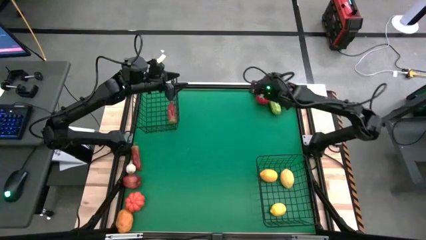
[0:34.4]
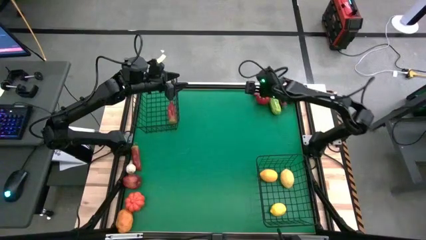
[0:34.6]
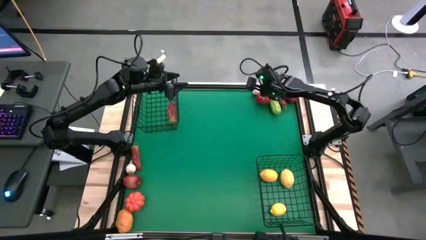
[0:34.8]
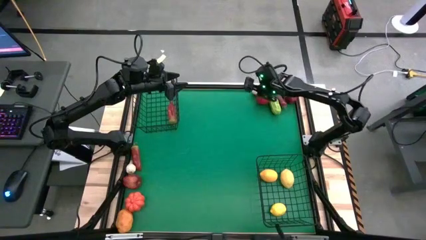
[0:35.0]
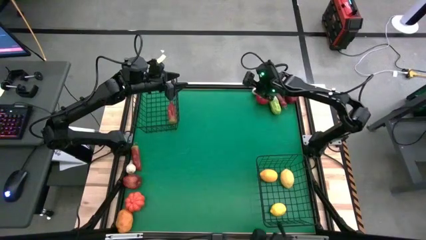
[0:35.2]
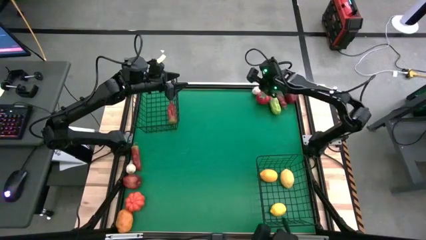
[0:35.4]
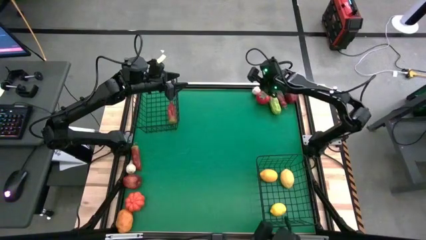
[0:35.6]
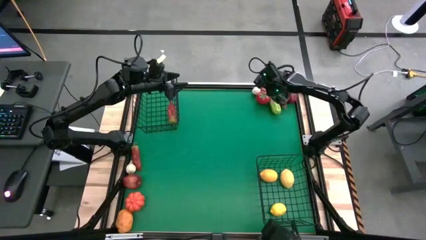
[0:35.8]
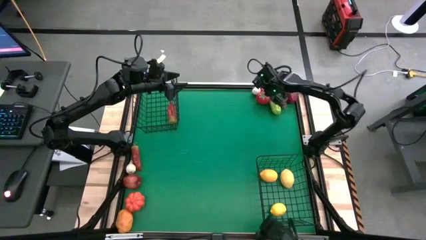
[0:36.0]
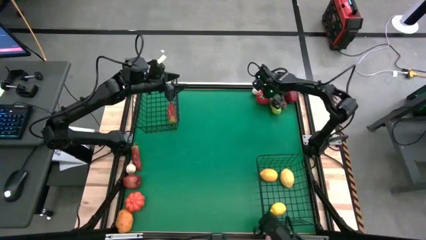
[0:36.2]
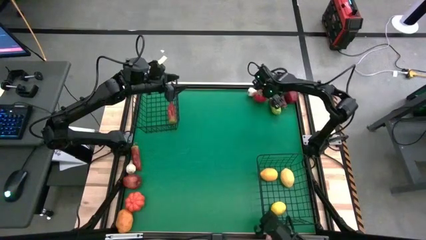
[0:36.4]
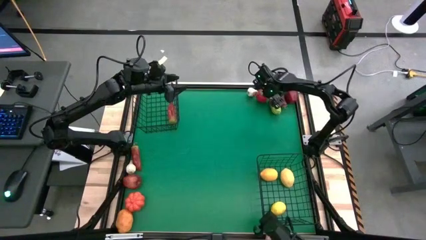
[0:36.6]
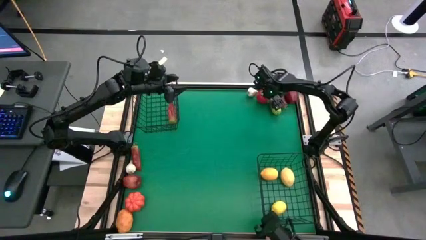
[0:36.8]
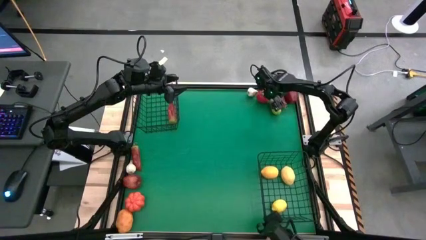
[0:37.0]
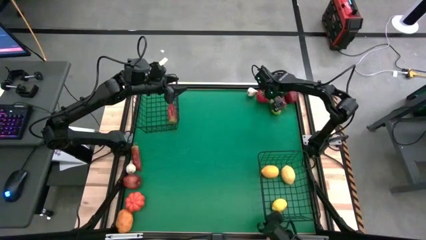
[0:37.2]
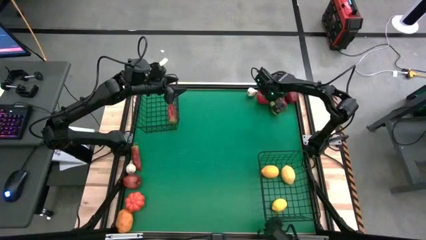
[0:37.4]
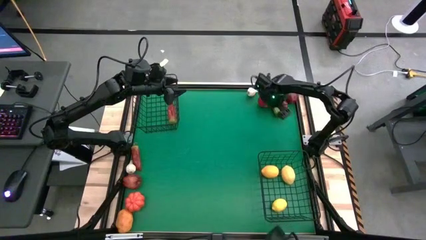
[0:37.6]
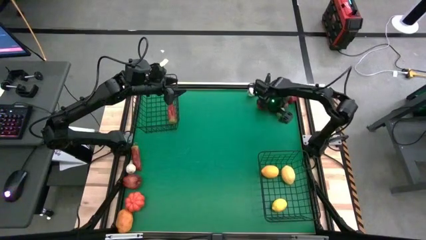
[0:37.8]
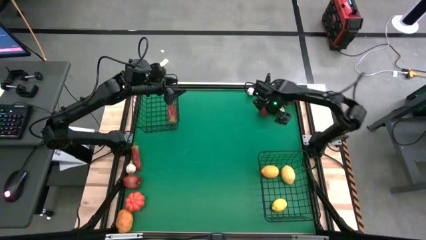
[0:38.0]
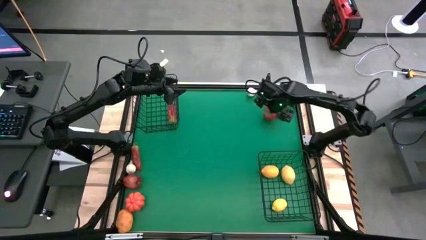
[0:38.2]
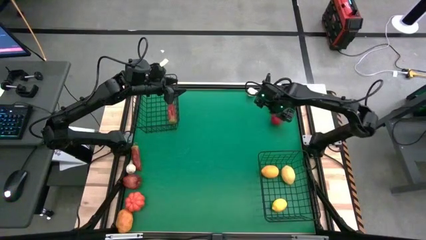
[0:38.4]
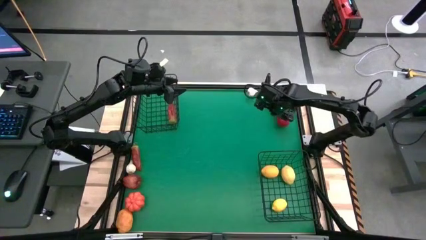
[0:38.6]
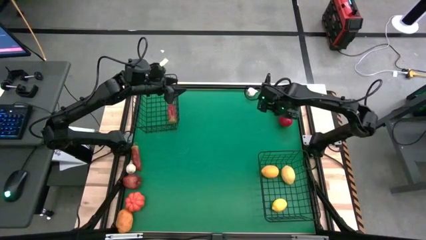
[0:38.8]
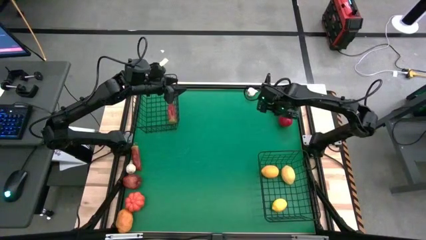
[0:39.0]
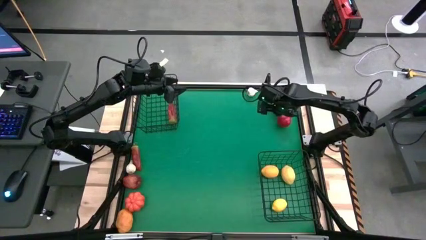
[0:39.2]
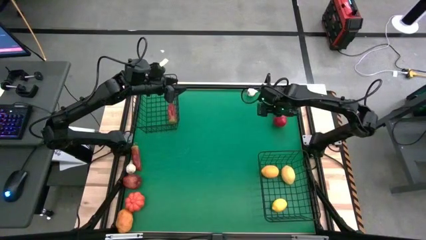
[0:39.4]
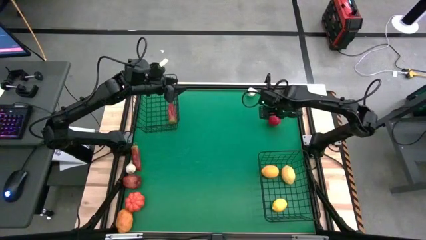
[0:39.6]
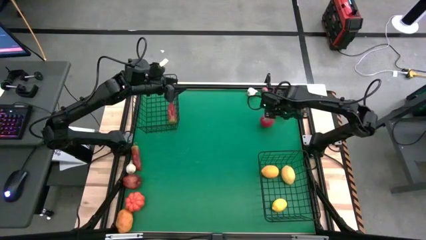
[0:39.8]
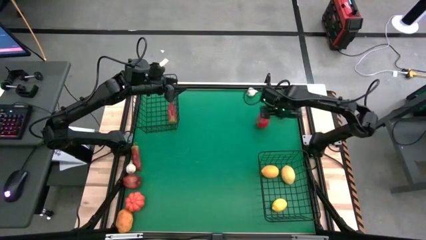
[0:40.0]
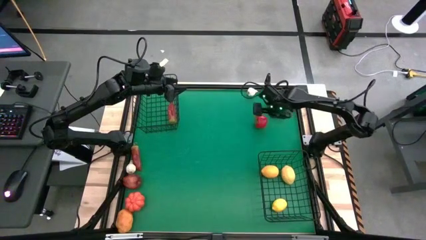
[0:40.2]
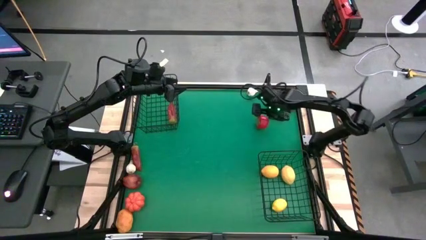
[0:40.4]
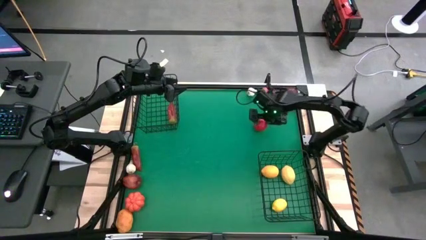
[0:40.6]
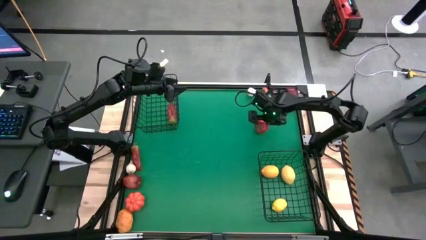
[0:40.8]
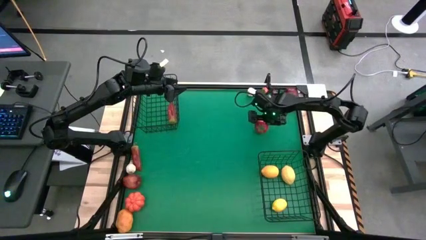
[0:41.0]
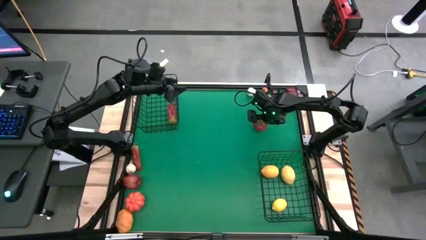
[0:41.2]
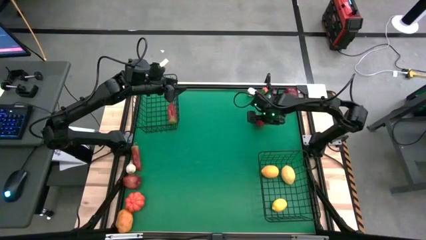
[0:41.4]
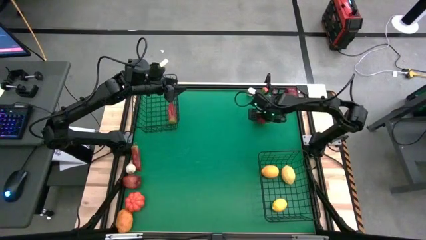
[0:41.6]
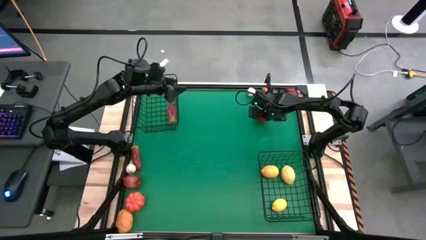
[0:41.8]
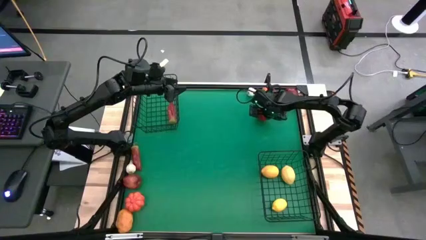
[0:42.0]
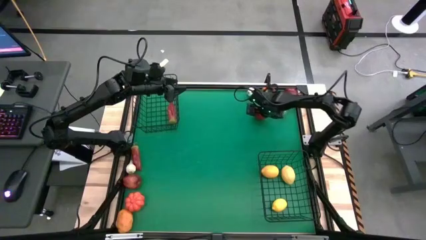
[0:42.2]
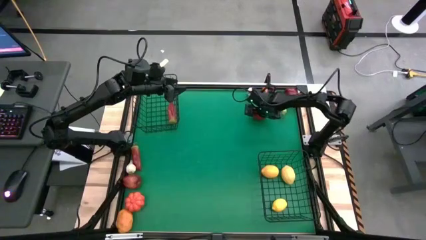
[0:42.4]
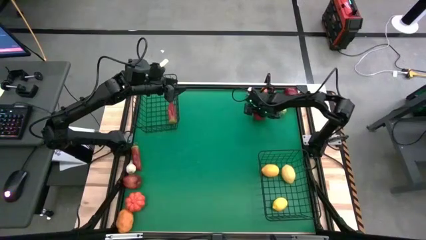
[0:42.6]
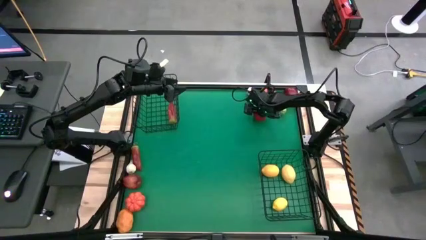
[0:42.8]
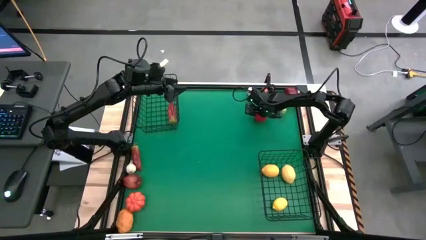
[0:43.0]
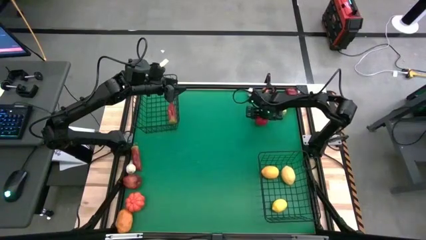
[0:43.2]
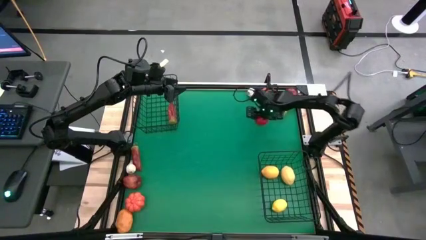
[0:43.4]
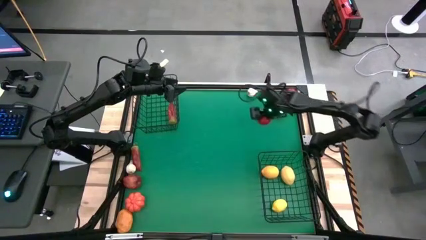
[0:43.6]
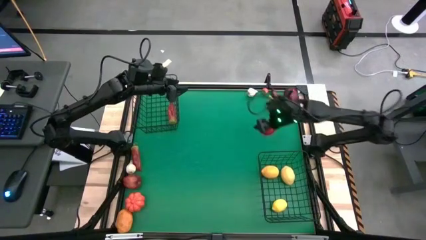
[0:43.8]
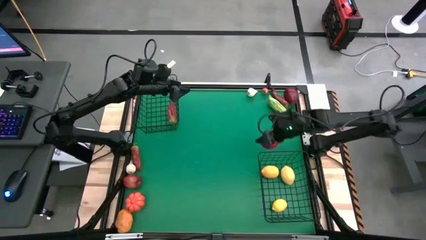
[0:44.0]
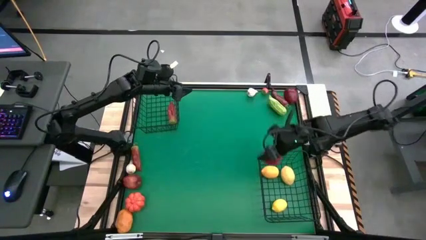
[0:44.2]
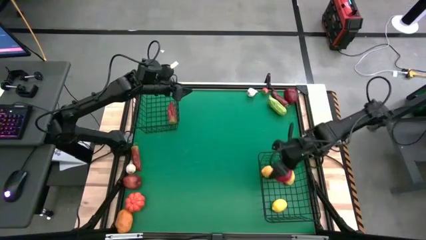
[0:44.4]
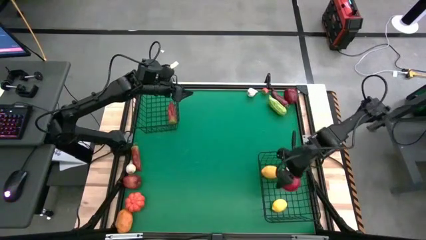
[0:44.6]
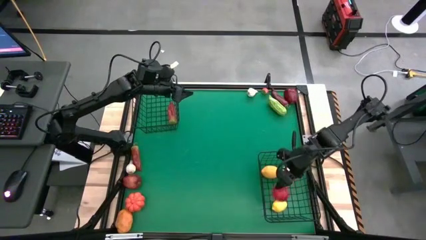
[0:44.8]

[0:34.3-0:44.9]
Task: Sort produce into baskets
Put the red tomato into the bottom black wire basket

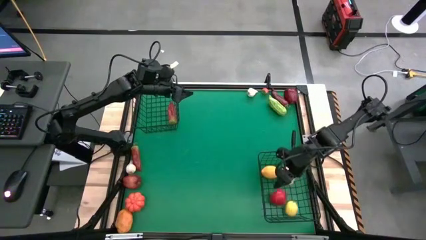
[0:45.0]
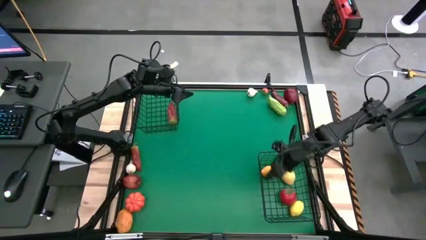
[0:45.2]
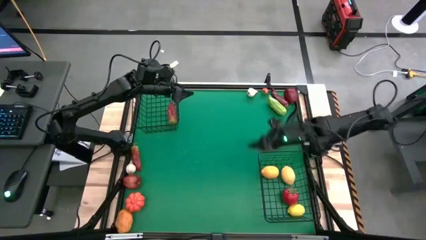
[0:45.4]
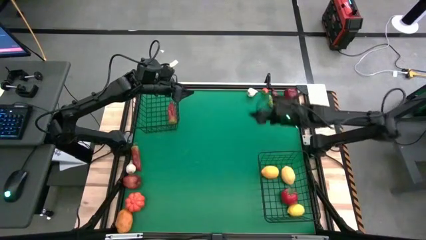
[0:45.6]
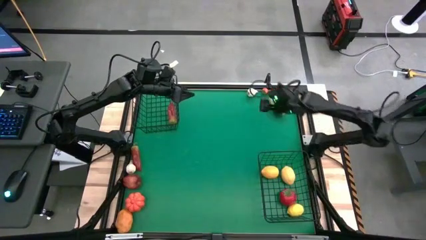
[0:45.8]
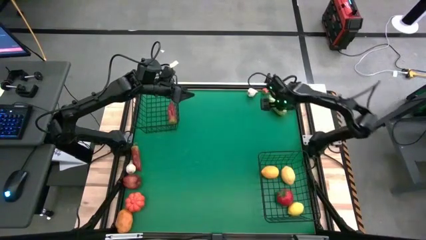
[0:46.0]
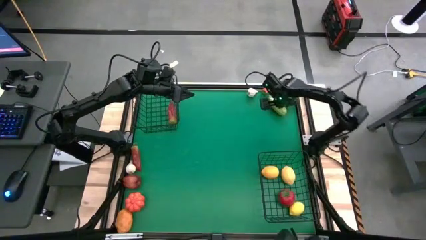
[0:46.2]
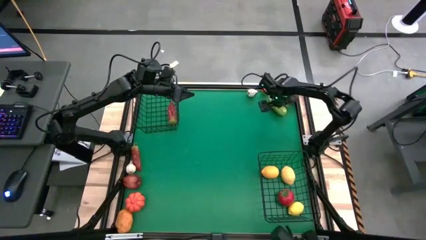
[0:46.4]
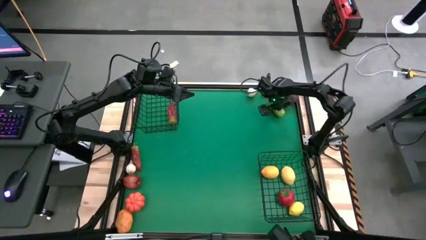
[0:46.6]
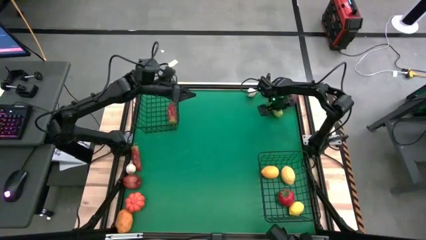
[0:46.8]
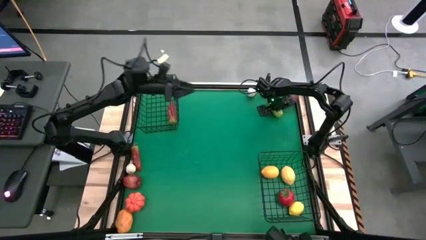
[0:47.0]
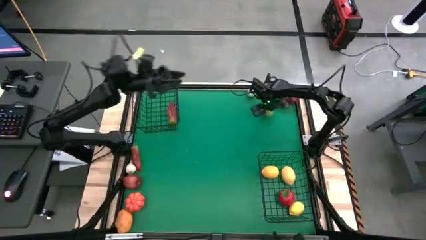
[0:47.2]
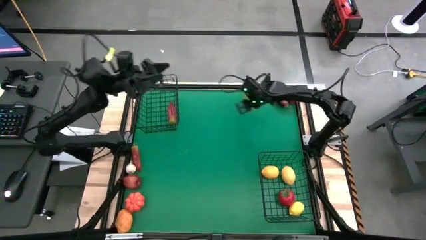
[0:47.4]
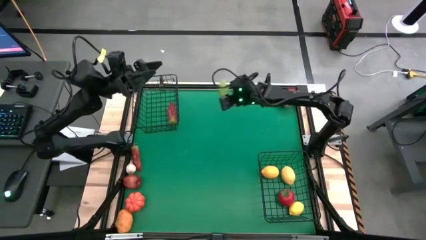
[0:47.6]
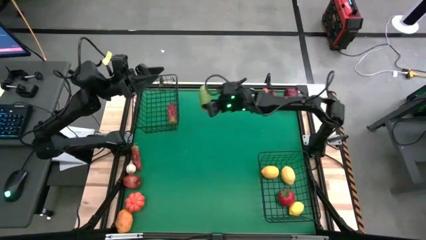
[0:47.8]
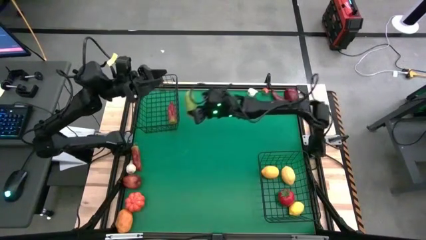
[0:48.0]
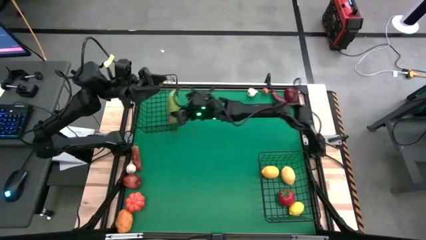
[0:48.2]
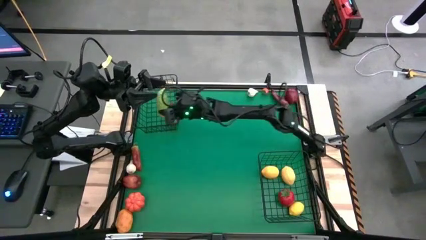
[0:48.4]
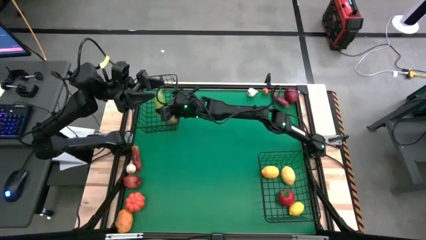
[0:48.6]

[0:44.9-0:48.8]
Put the green bitter gourd into the top black wire basket

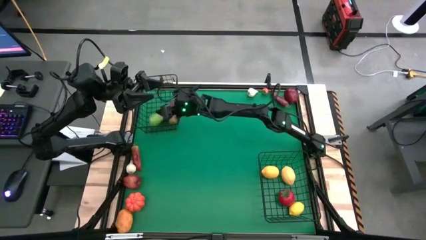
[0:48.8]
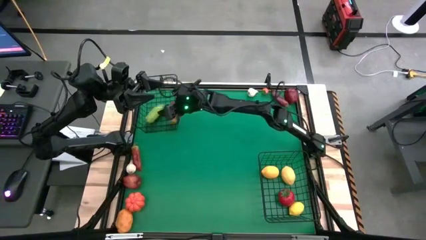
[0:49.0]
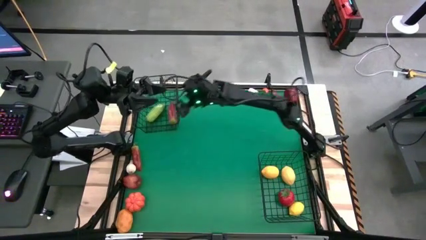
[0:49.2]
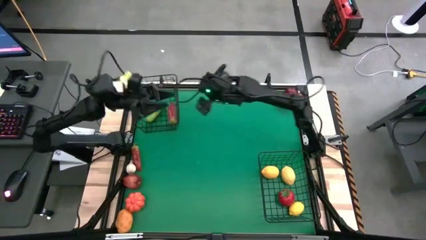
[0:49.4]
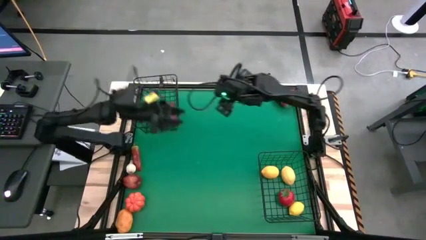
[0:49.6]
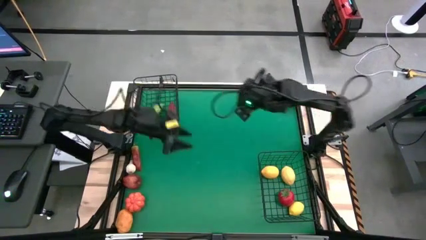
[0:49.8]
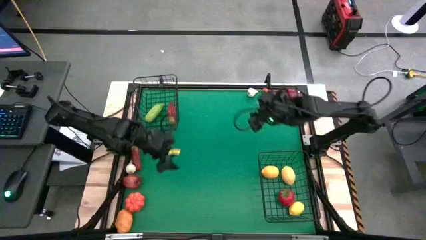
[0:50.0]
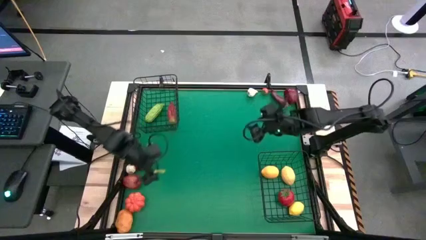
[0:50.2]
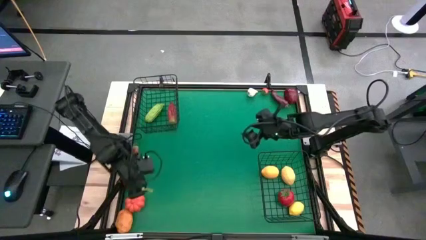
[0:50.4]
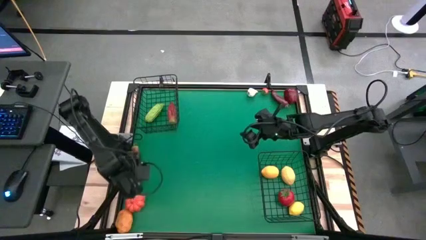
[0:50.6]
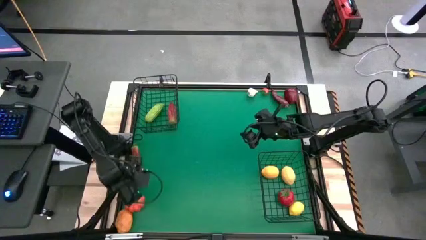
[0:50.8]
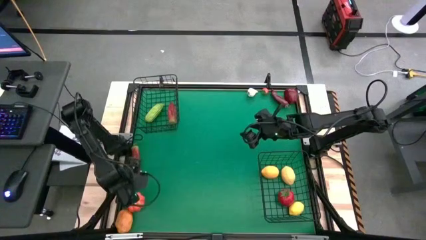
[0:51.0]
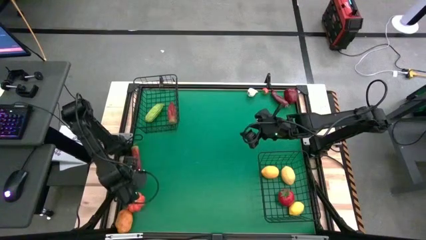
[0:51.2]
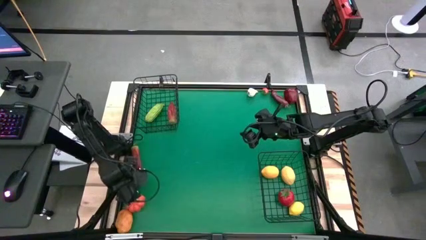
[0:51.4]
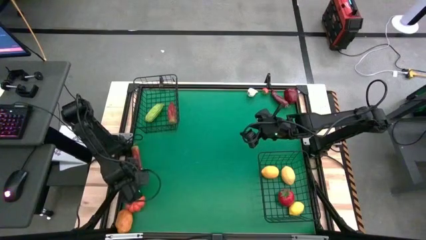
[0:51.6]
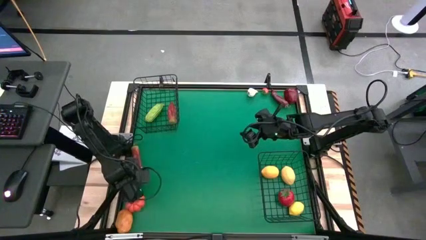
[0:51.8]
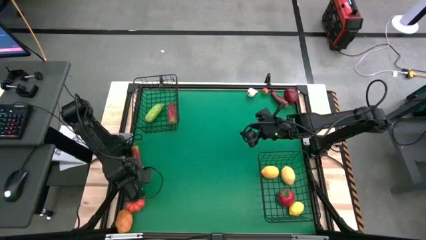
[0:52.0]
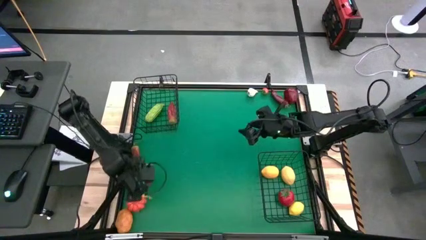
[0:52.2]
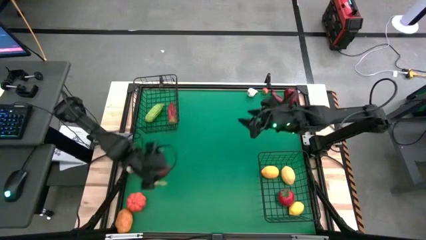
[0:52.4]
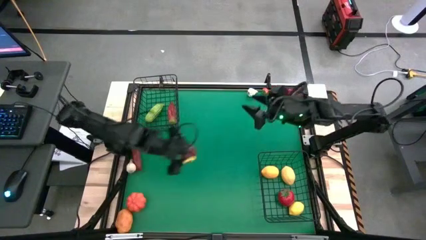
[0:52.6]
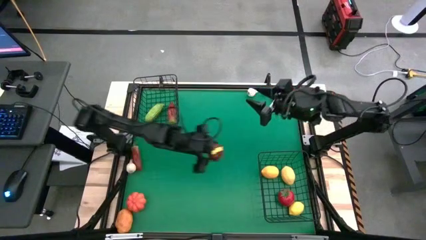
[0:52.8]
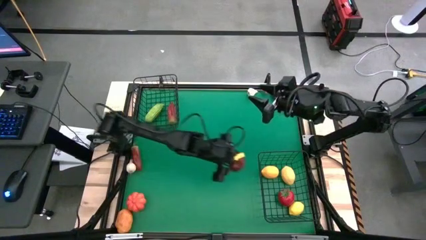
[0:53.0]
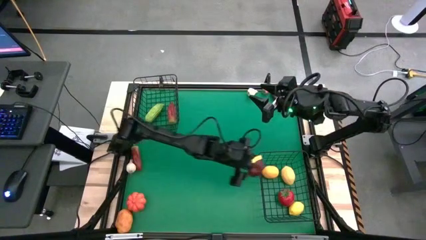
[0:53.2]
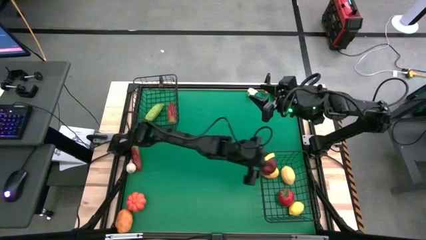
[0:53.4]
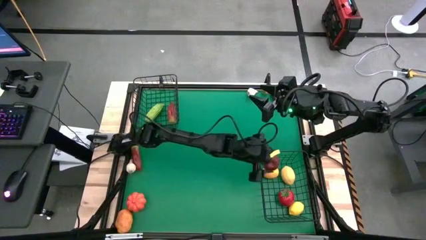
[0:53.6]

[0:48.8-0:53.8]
Put the bottom red apple into the bottom black wire basket
